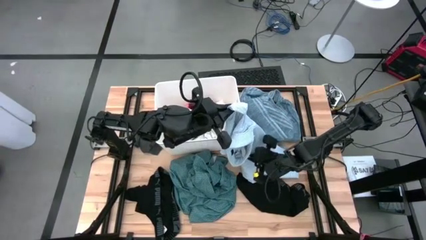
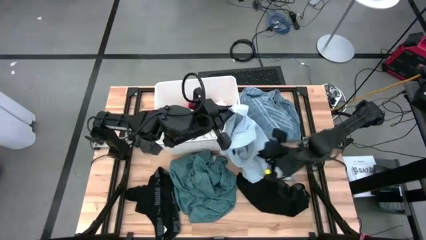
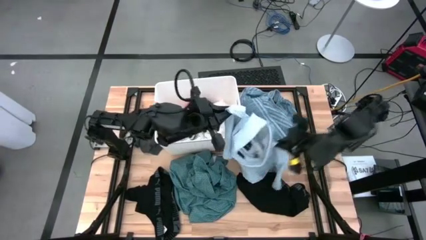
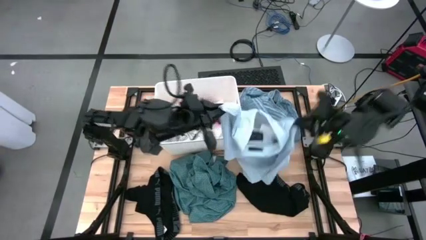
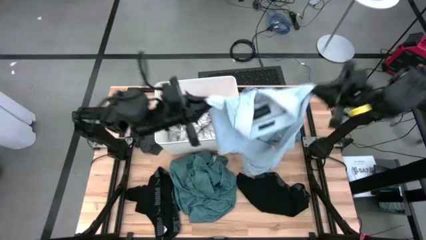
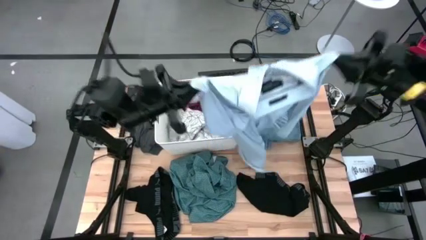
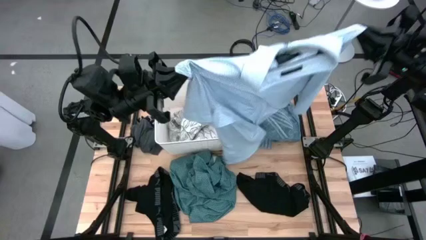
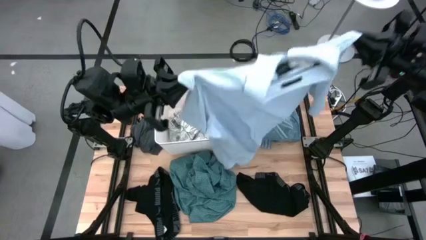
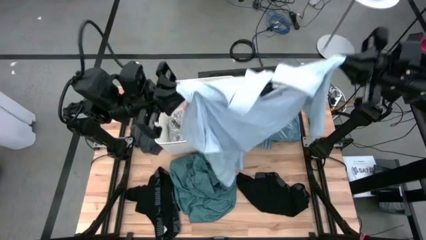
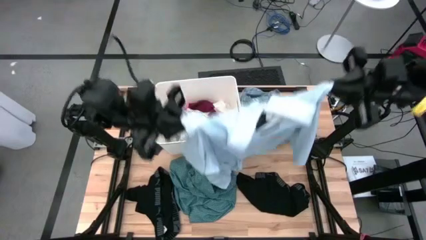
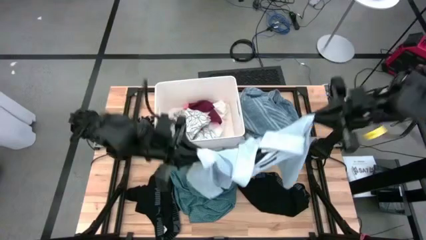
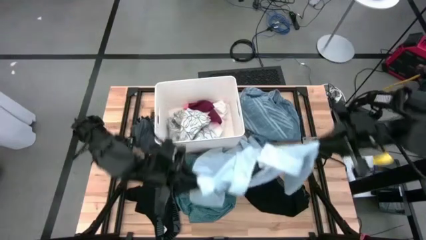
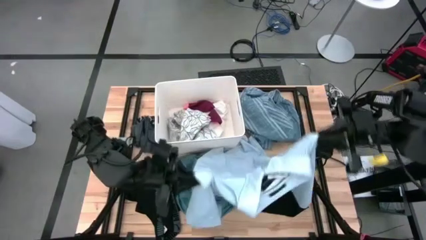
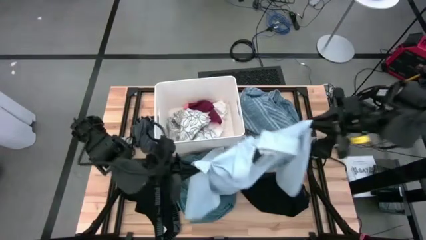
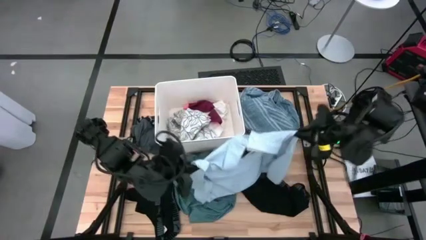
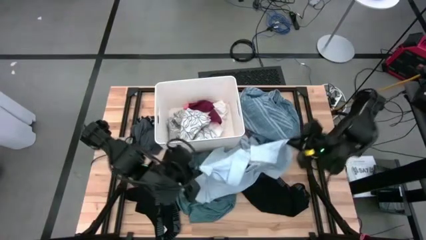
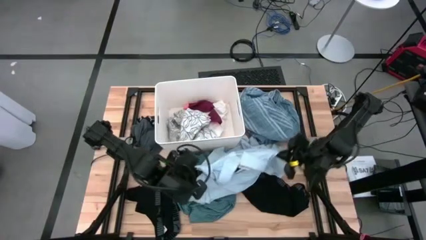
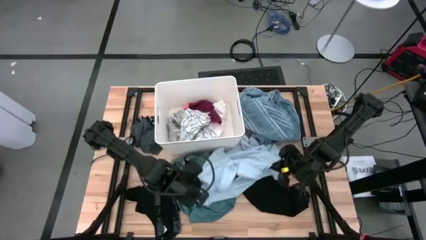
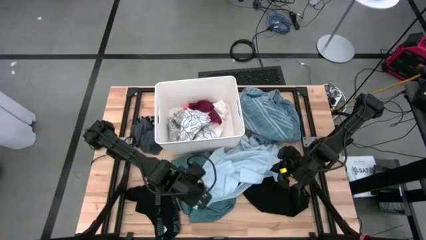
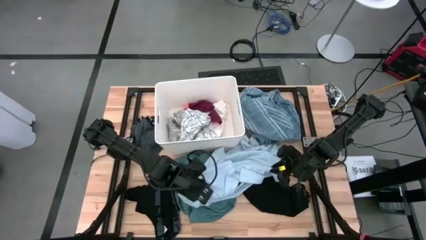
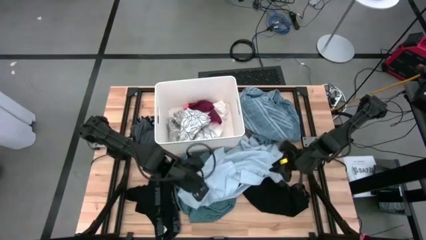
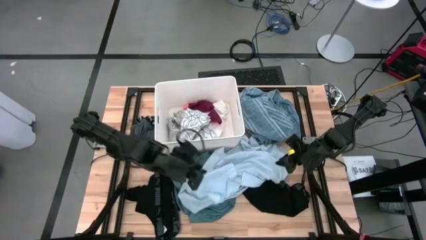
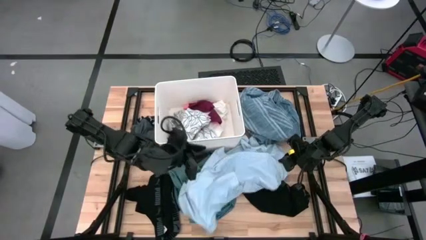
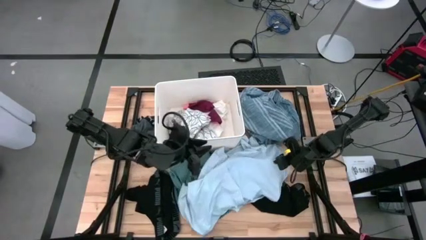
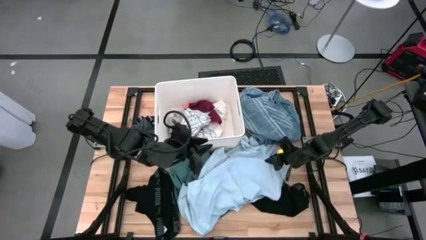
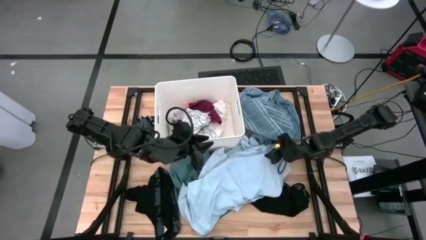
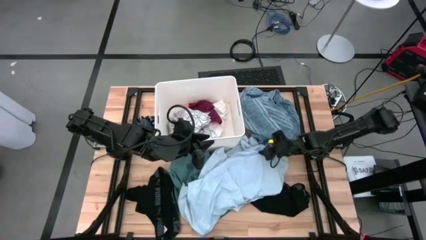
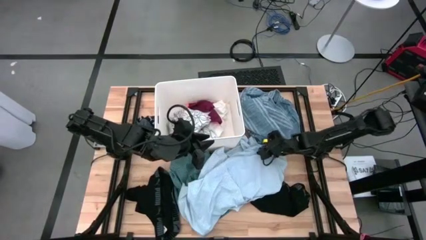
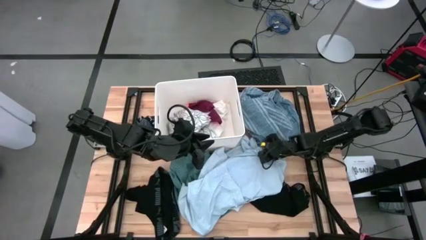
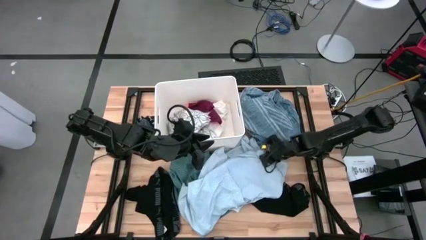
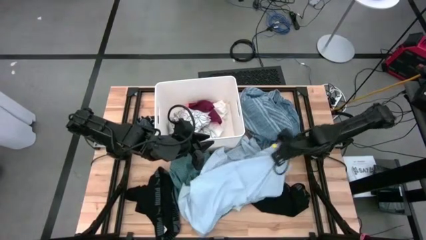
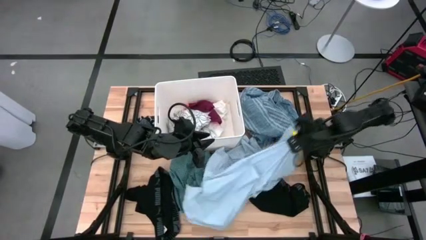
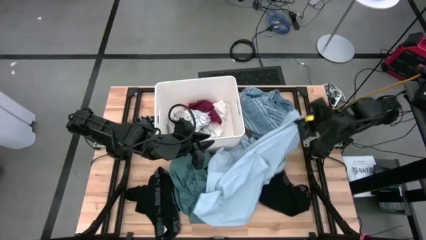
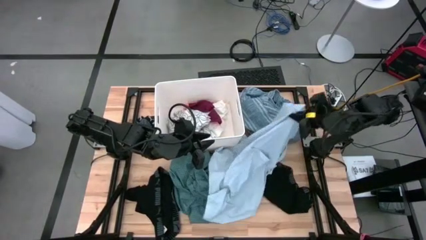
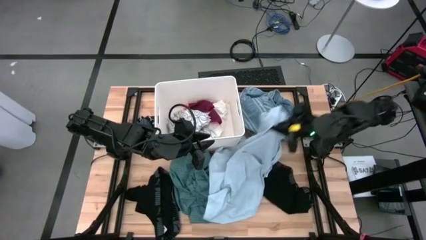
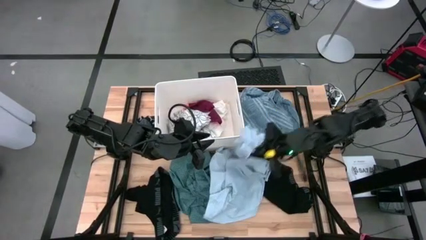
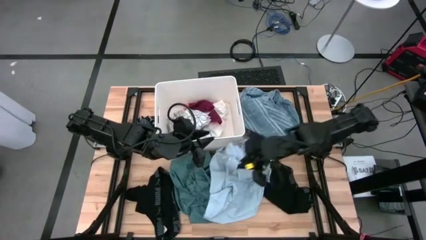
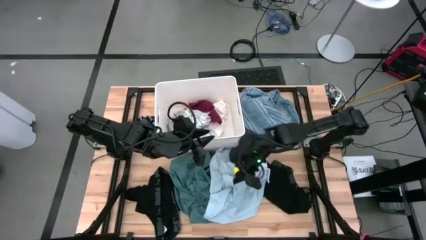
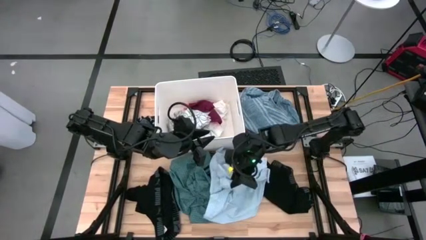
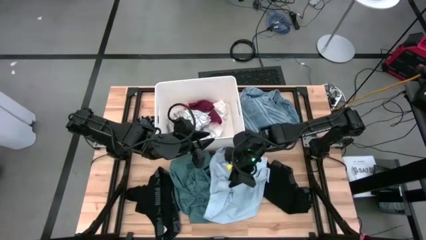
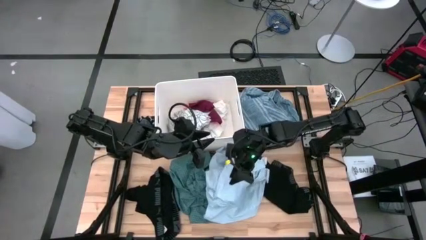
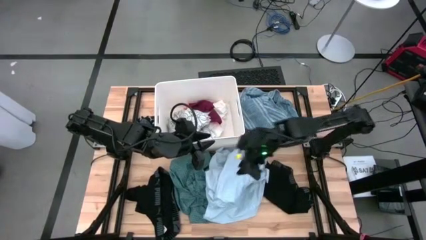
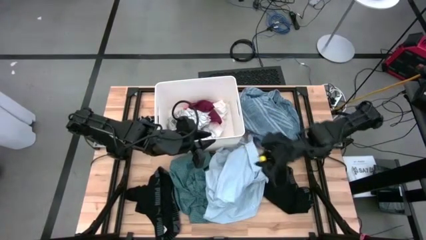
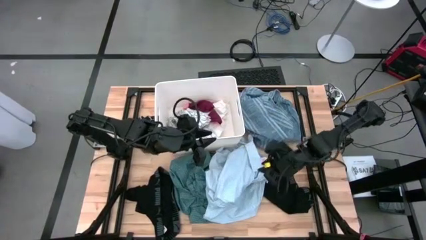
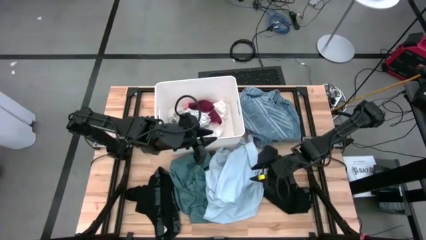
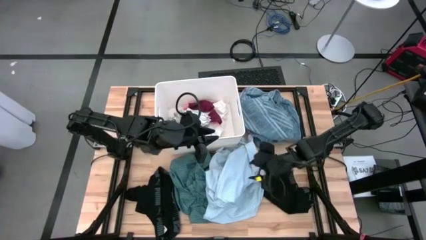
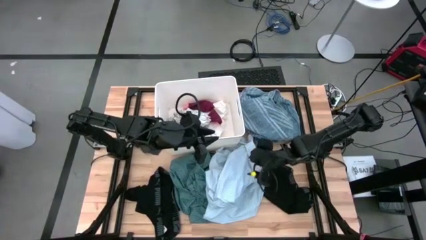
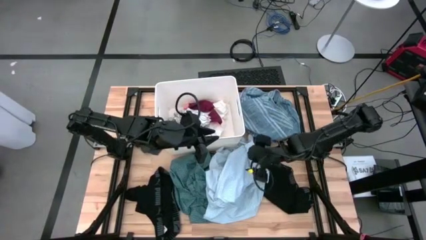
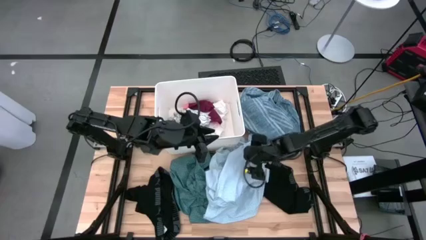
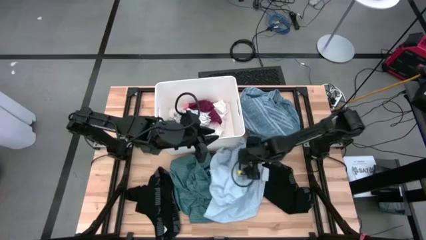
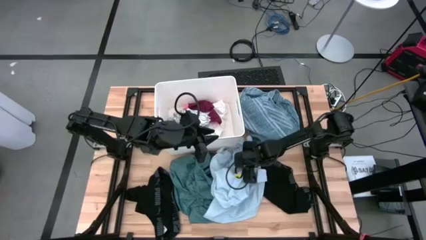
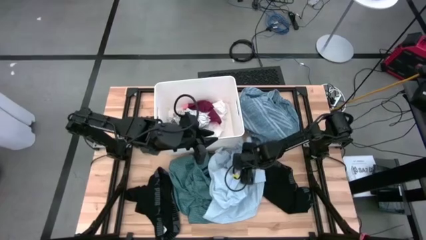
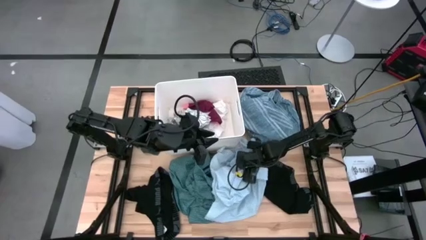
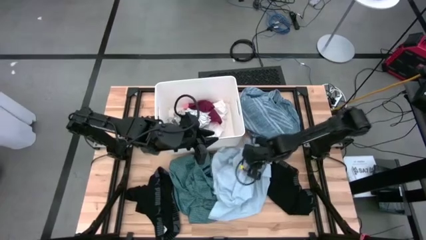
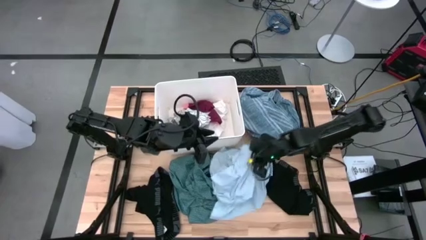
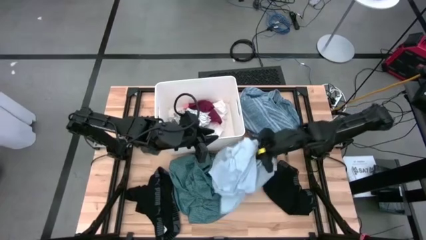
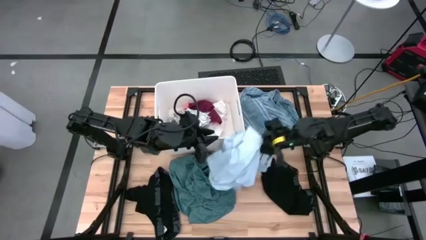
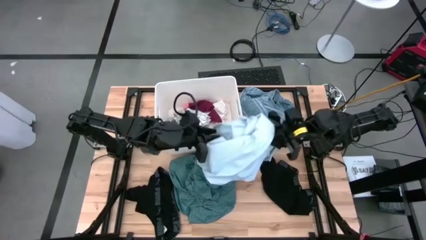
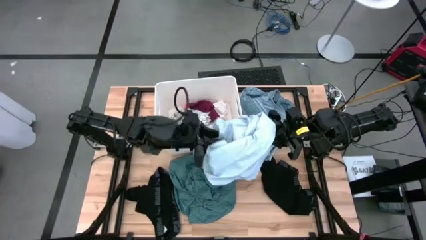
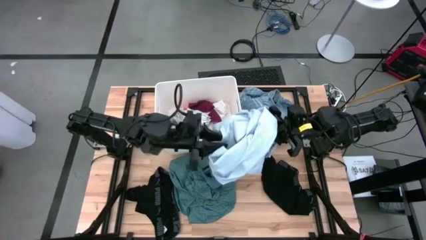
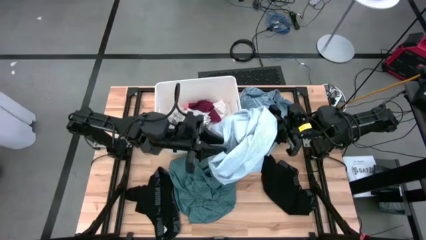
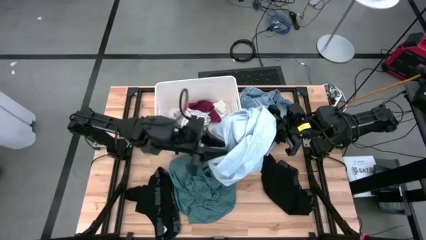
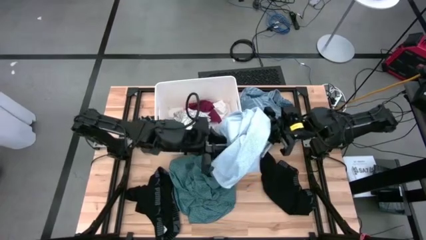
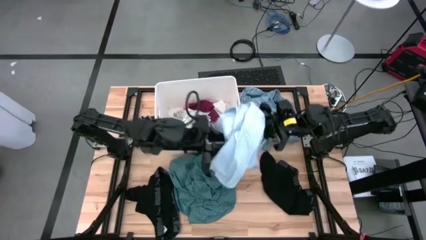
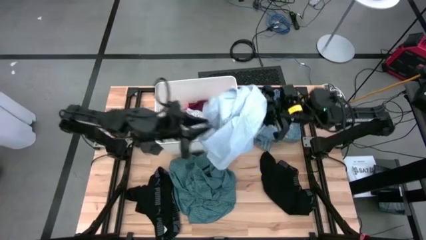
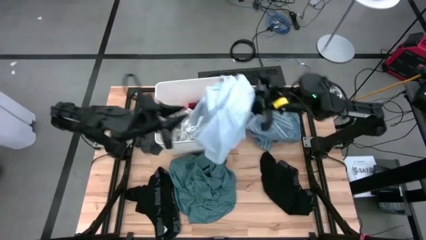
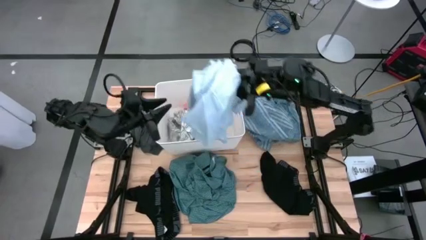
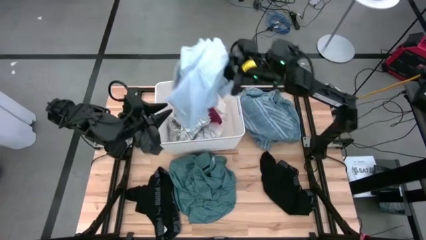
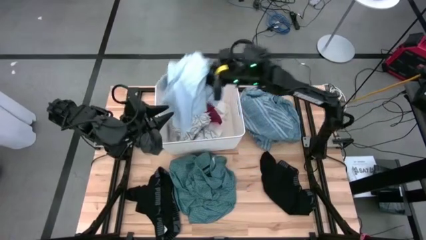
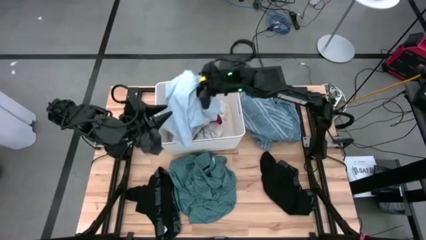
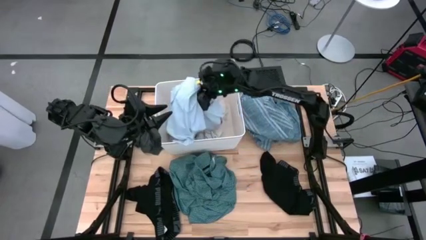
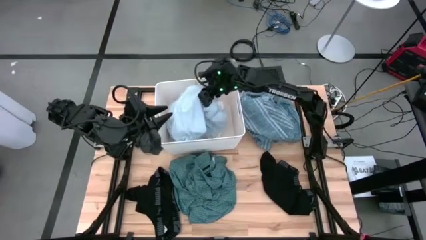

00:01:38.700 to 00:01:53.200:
Task: Sort clothes
Put the light blue polo shirt into the white laundry organizer

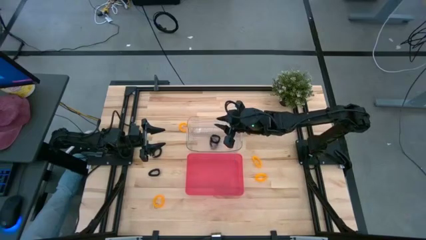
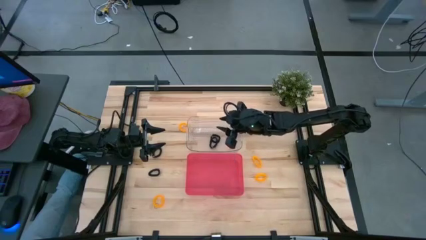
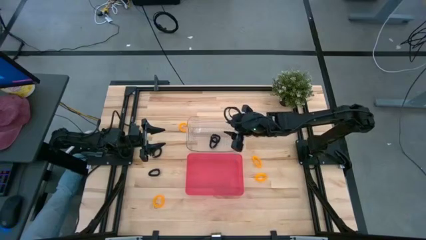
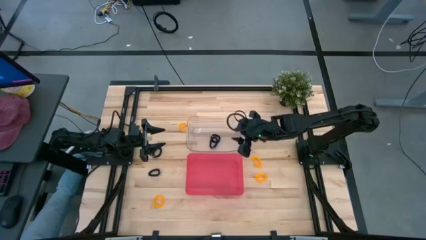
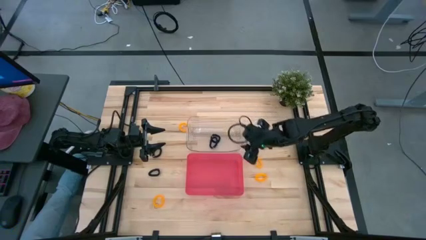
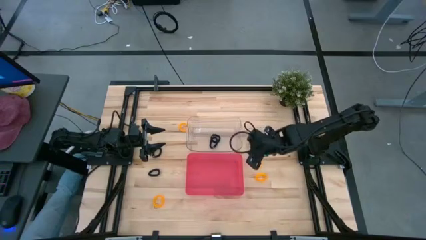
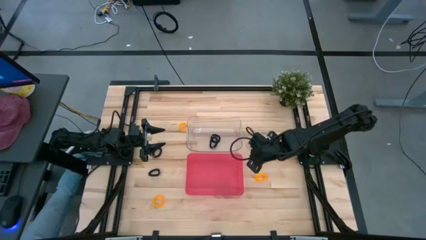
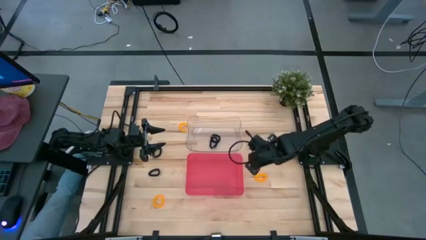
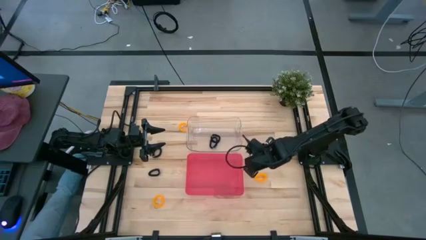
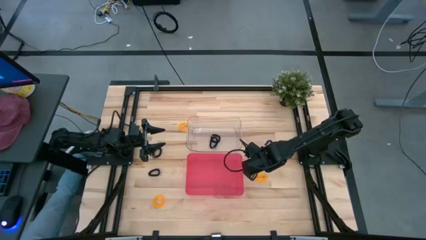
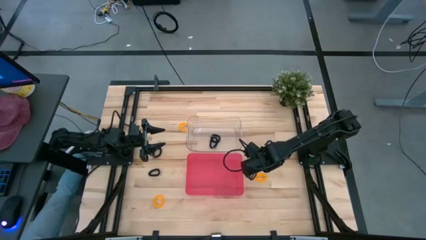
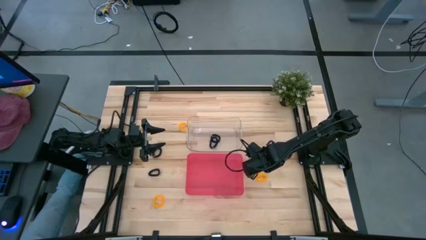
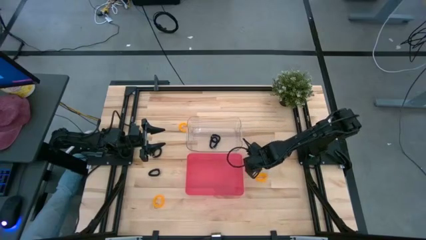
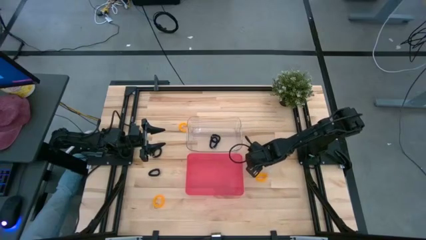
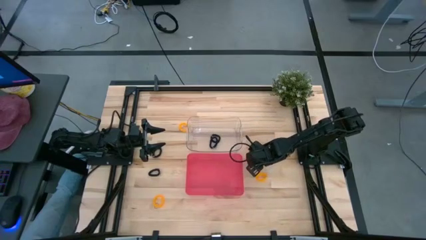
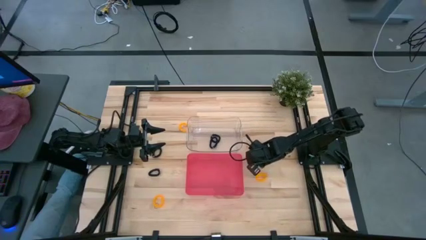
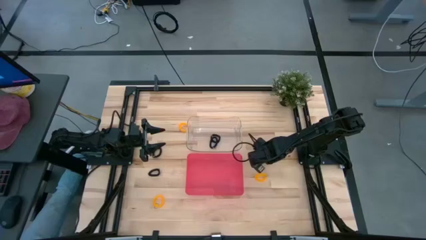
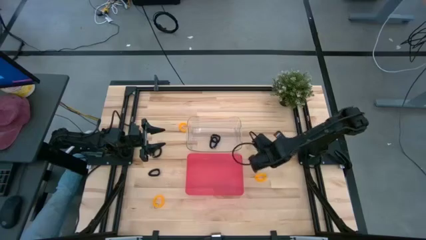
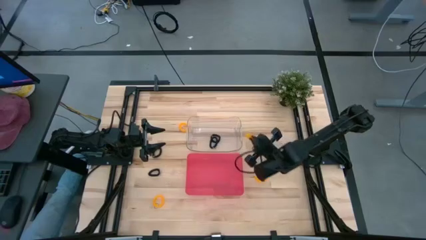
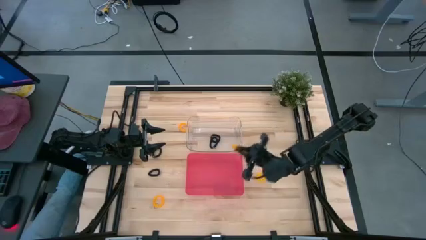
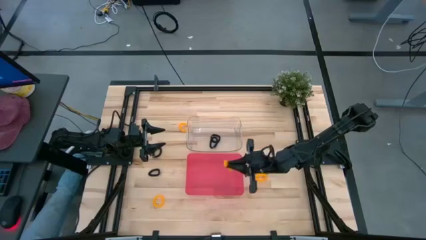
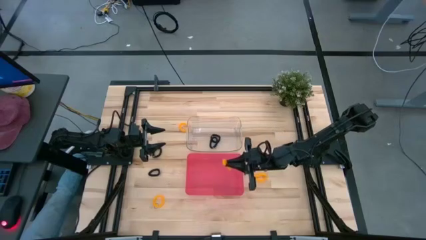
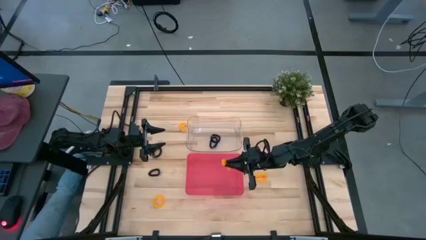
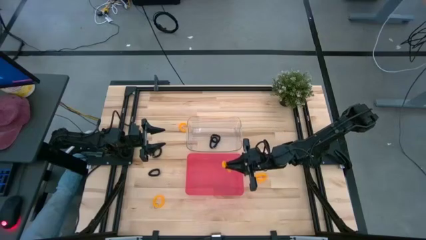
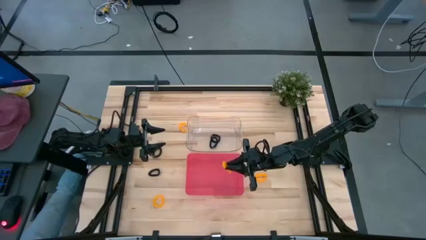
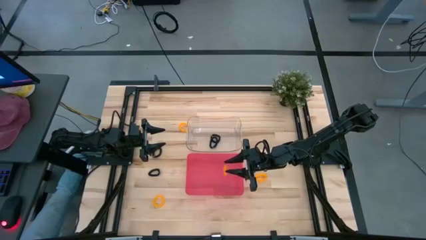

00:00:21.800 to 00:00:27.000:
Task: Sort spring keychains
Put the yellow spring keychain into the red bin
